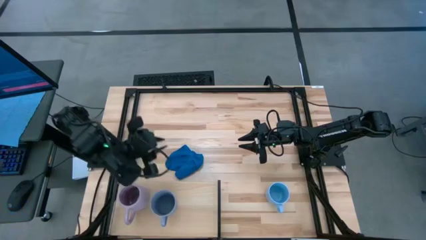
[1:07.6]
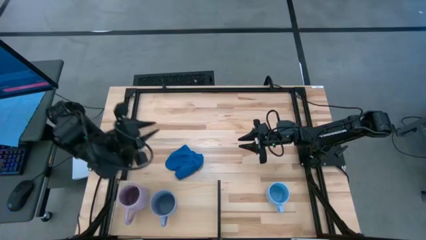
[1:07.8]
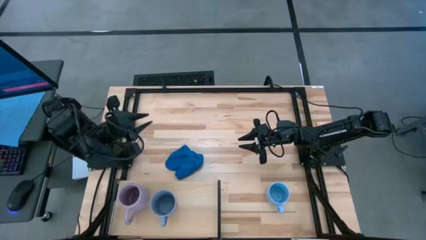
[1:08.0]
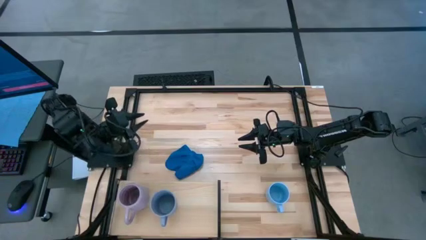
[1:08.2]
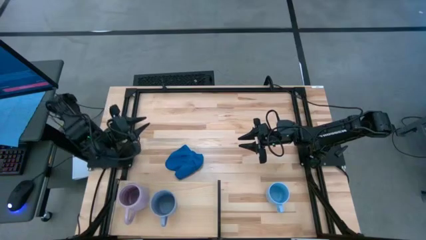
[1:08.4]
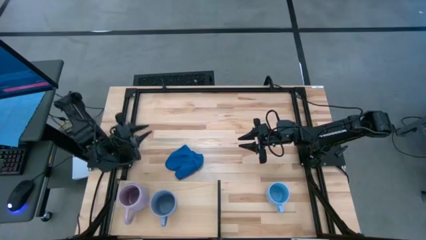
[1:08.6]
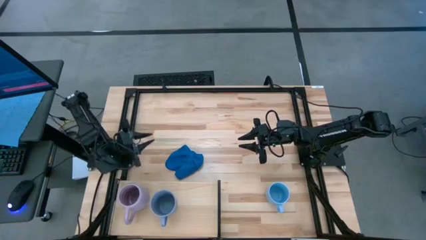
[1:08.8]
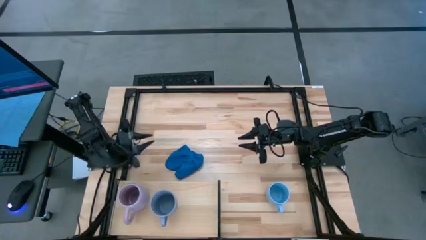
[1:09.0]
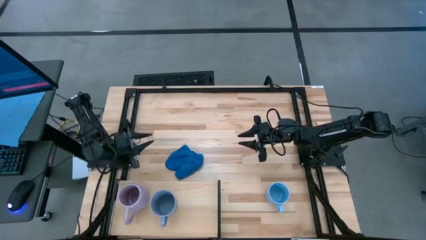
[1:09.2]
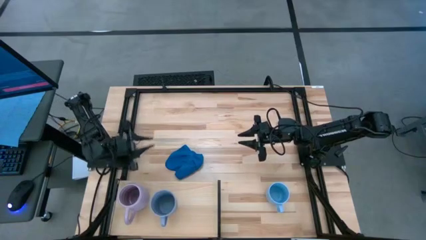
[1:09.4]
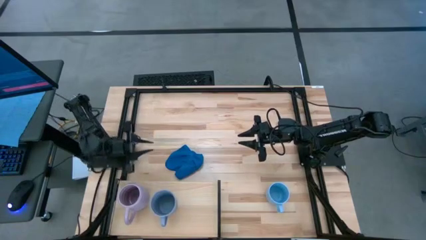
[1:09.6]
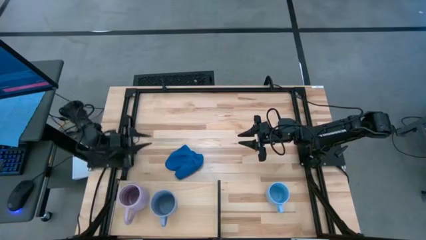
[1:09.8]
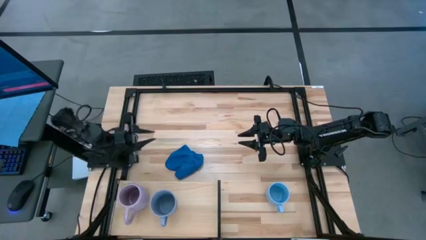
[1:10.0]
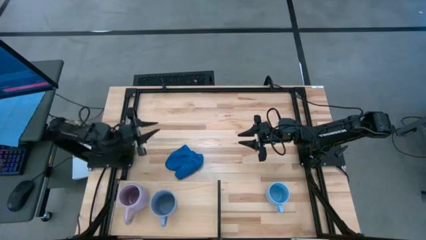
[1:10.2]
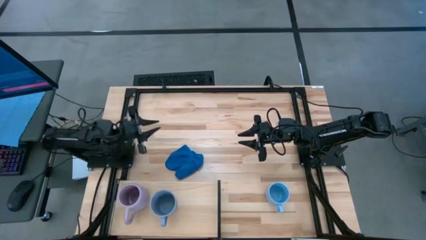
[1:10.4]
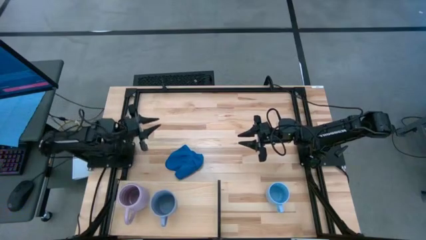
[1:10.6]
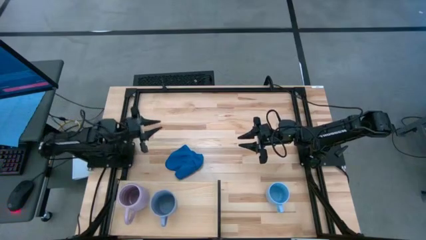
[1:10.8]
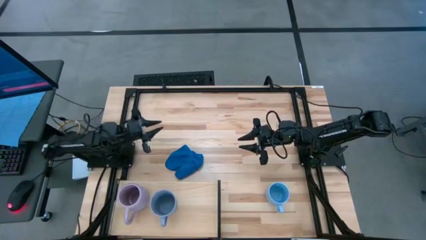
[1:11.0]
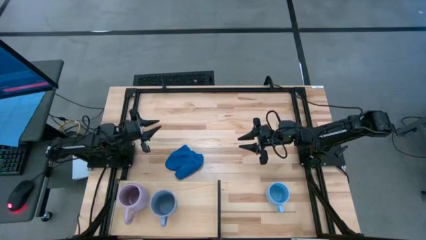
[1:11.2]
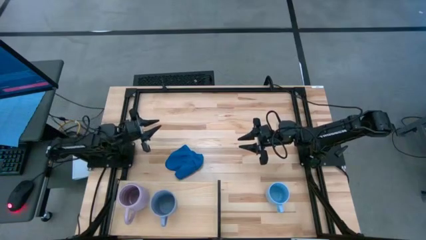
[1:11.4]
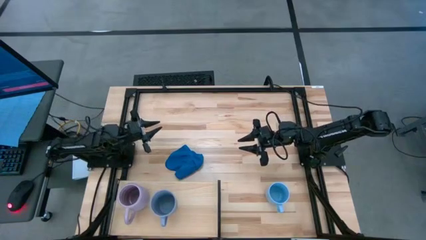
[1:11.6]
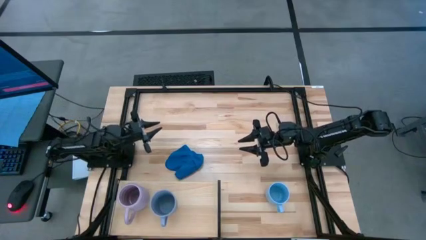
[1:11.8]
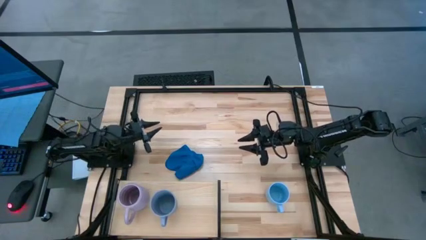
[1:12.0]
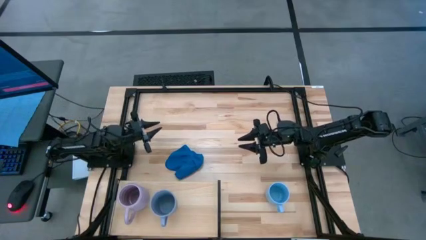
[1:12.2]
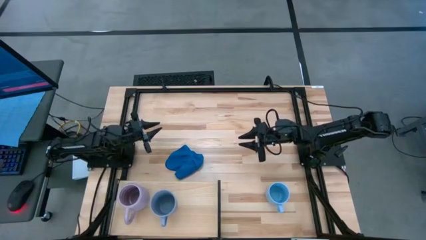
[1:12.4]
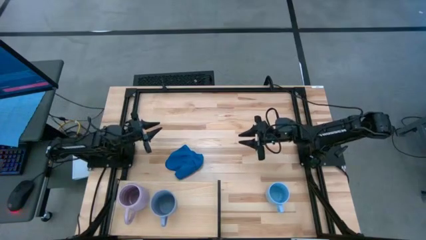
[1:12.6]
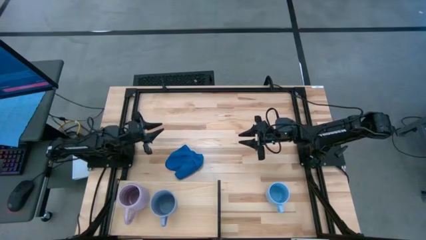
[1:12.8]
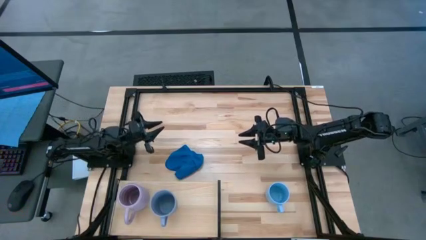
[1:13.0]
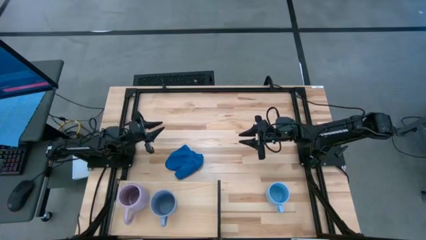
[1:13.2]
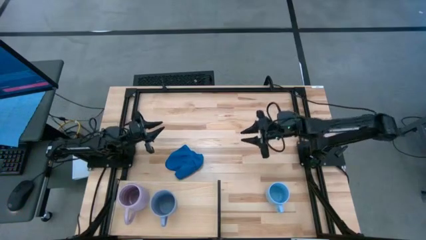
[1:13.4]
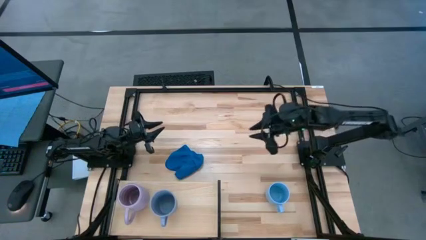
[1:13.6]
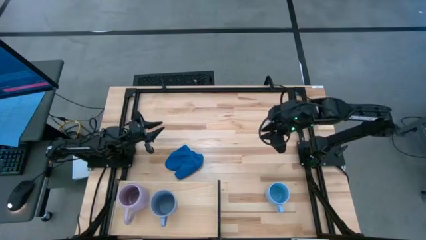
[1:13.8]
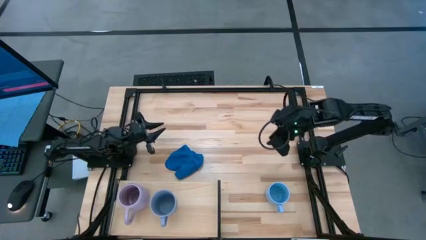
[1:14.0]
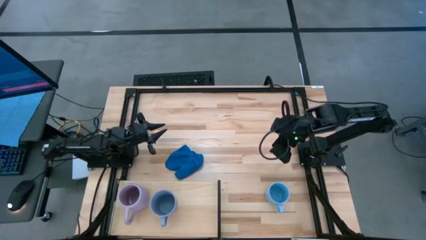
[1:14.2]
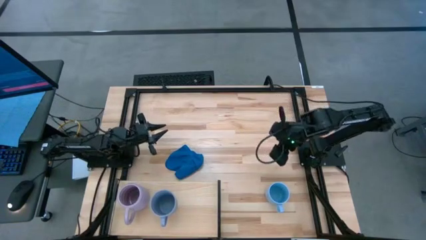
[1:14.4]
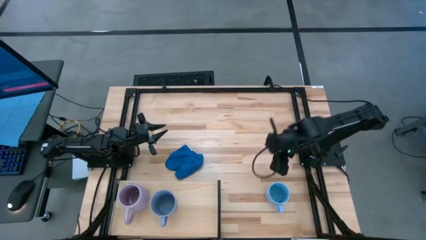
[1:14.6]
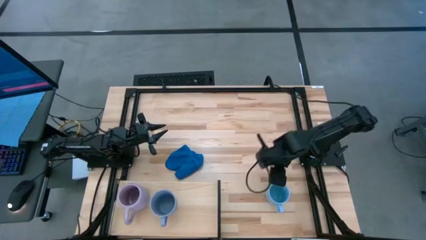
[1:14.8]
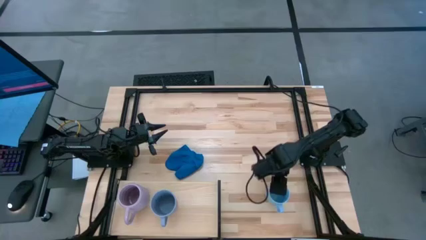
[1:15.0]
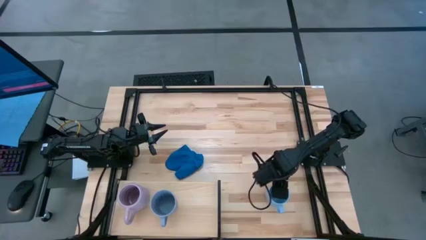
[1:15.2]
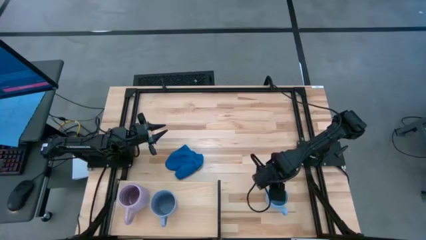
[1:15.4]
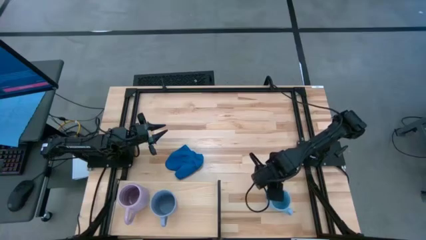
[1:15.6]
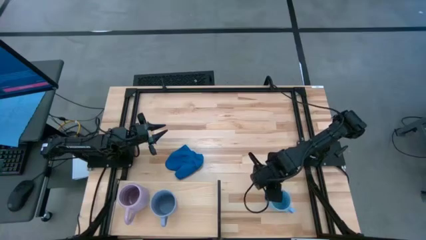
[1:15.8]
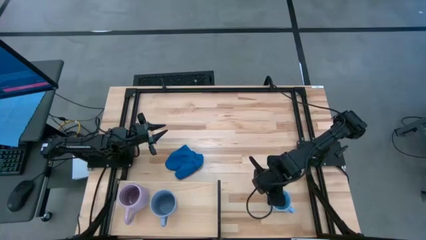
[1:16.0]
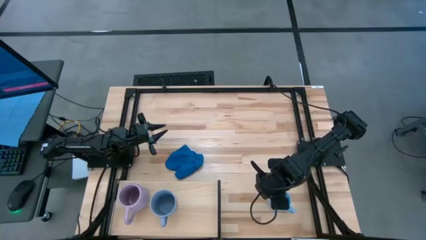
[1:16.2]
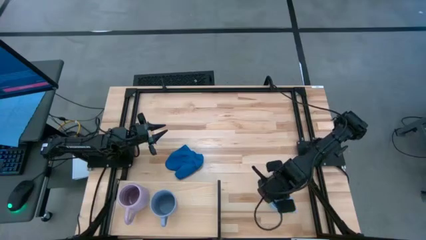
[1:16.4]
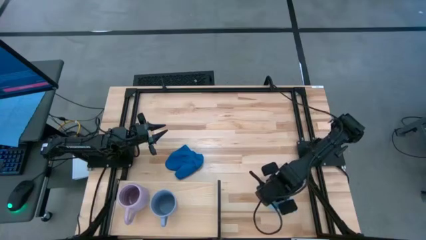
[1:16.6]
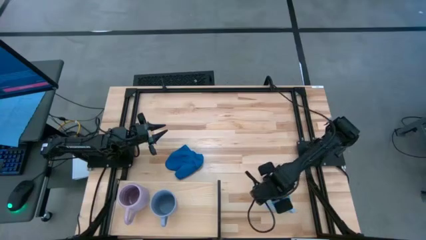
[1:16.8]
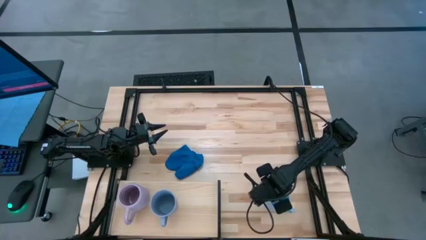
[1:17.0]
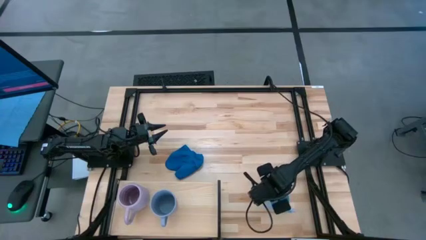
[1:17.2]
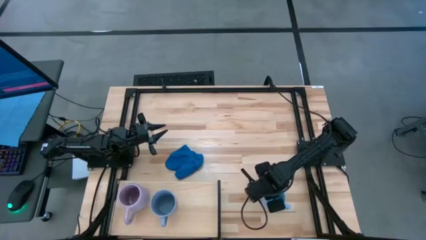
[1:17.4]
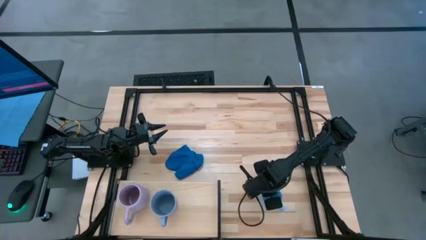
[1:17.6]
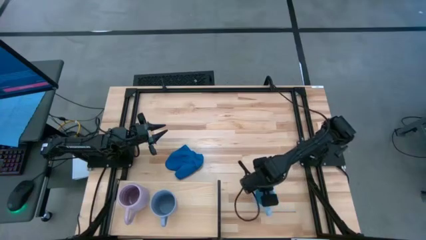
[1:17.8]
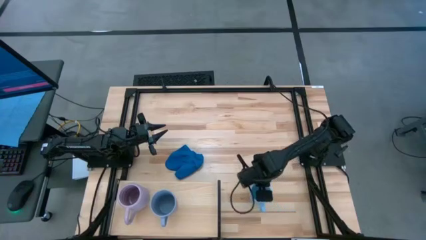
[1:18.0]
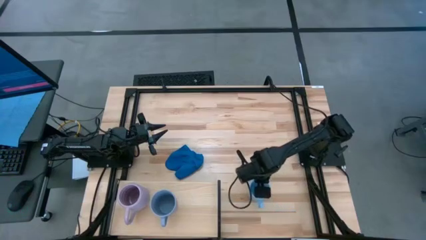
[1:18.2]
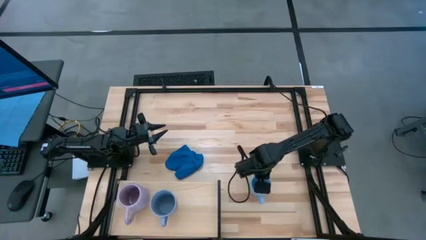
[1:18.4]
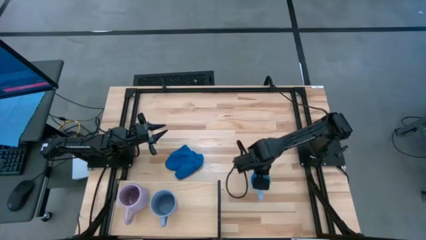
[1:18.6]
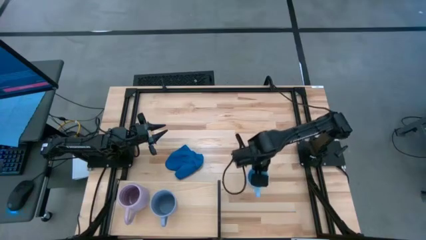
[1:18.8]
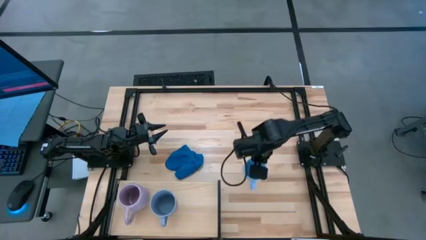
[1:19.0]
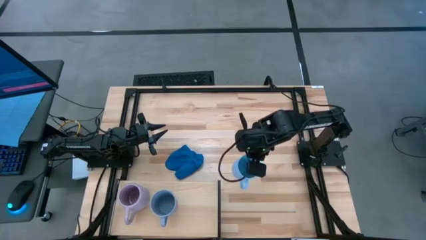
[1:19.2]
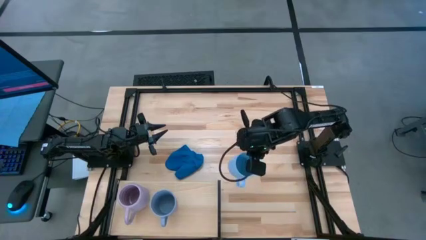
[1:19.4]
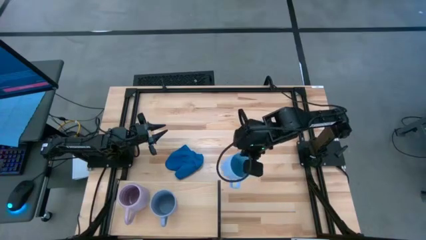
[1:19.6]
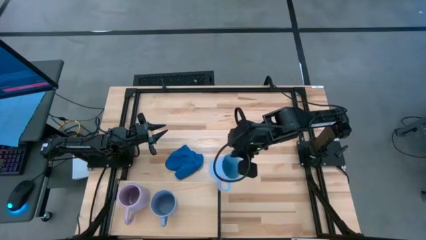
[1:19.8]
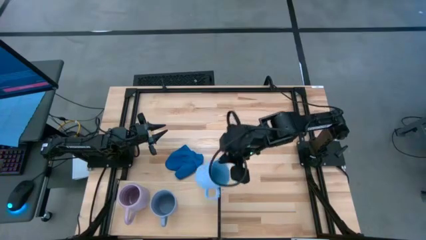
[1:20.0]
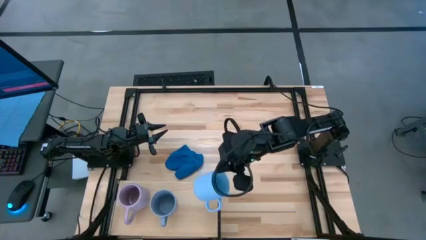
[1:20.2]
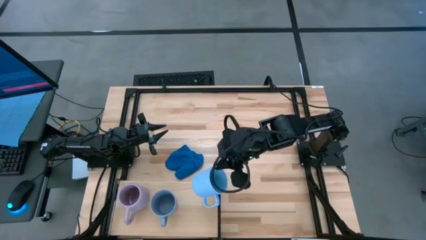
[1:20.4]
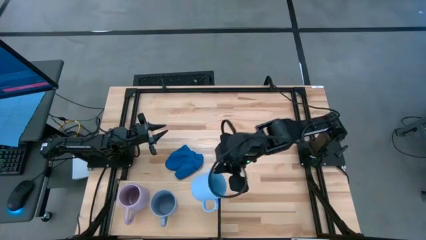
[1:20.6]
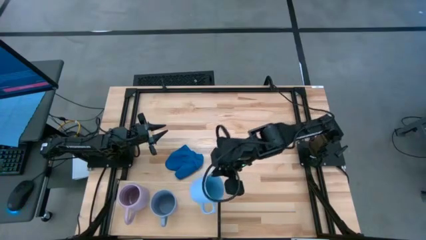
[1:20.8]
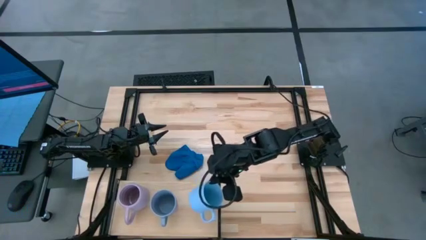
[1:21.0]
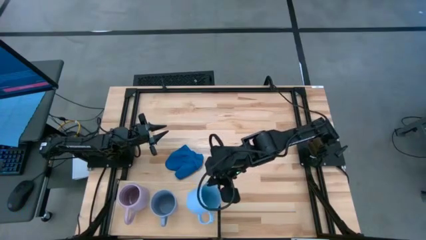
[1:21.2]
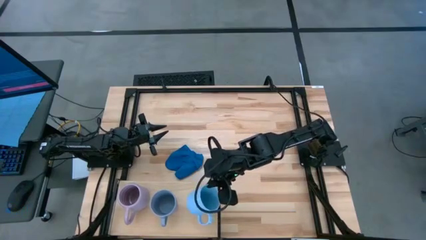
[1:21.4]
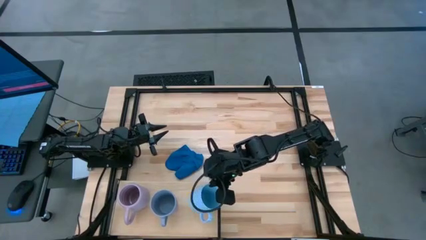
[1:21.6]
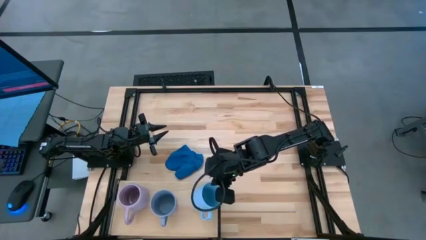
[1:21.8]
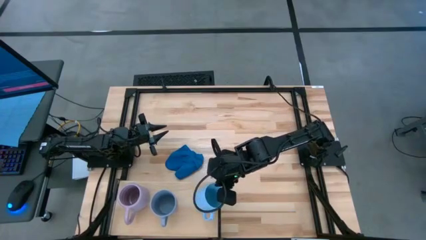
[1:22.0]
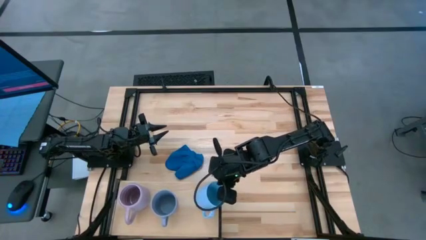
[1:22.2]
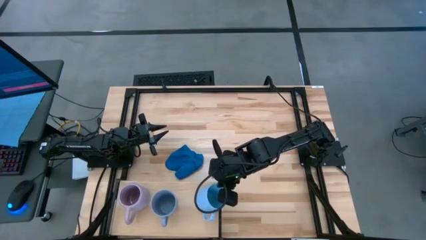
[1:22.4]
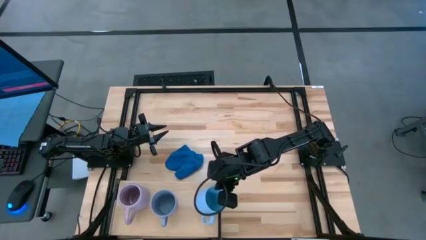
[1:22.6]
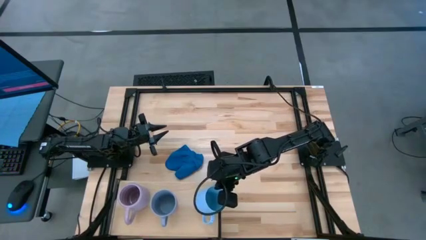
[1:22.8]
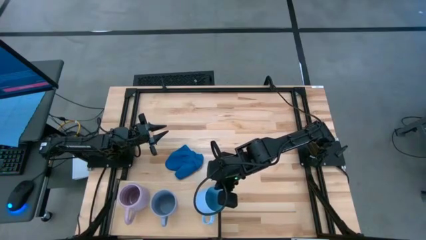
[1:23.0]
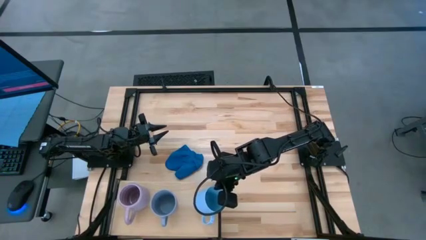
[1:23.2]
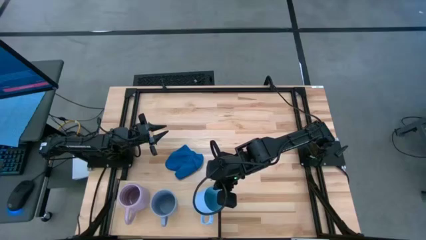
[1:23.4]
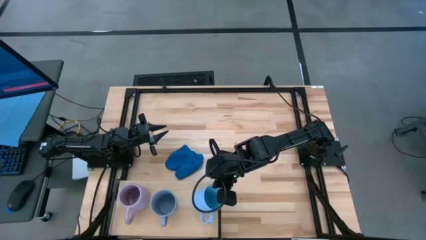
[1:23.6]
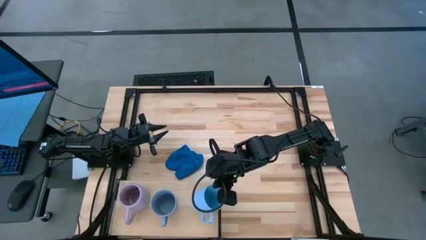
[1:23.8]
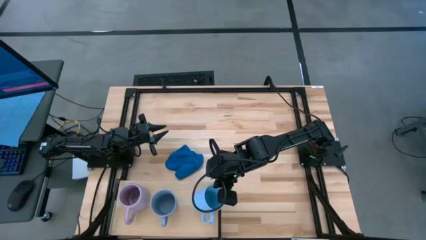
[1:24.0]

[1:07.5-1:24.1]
Task: Stack small to large cups/mugs on shelf
Put the light blue cup on the shelf
